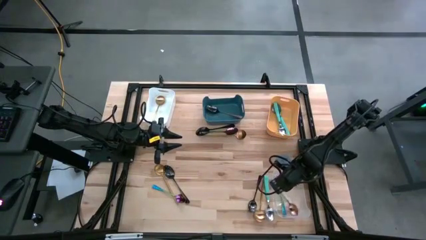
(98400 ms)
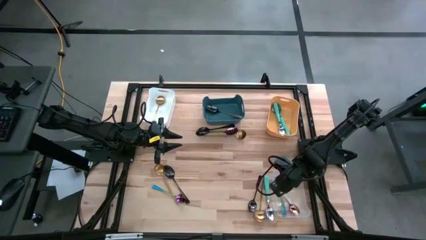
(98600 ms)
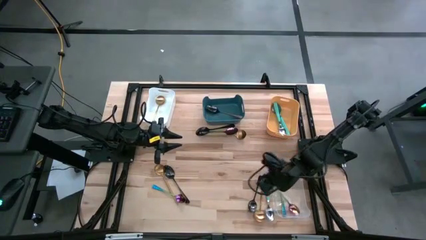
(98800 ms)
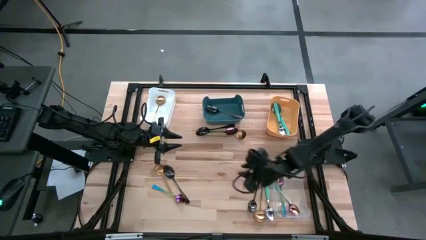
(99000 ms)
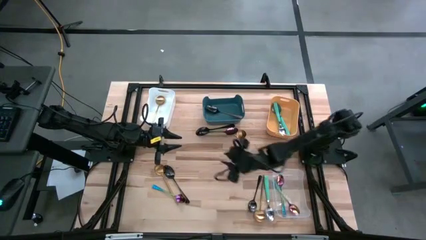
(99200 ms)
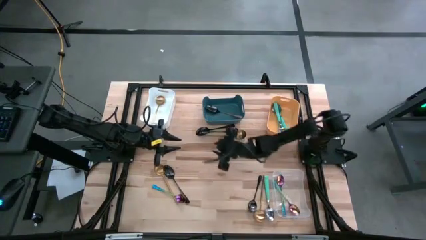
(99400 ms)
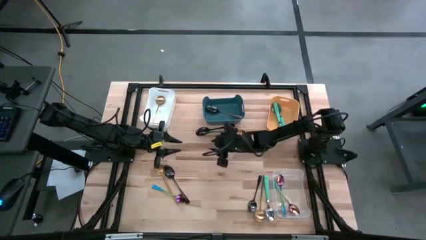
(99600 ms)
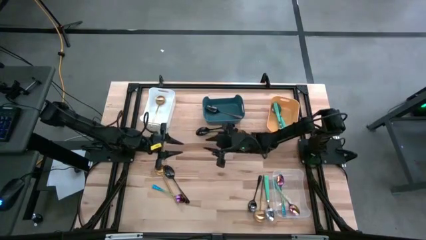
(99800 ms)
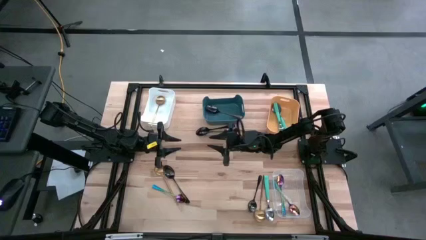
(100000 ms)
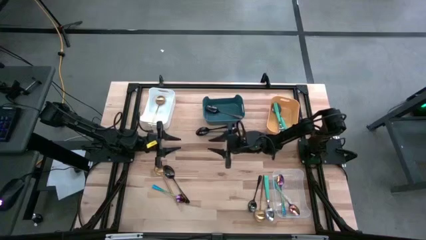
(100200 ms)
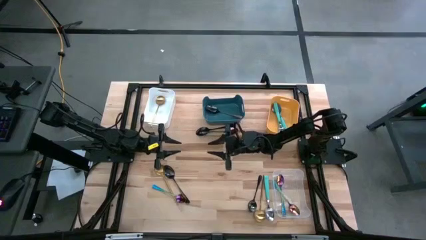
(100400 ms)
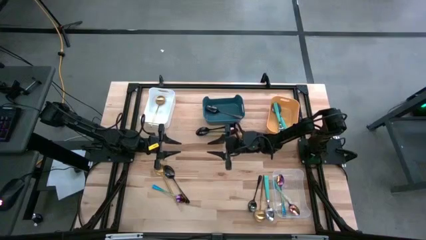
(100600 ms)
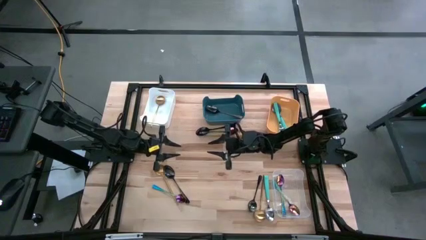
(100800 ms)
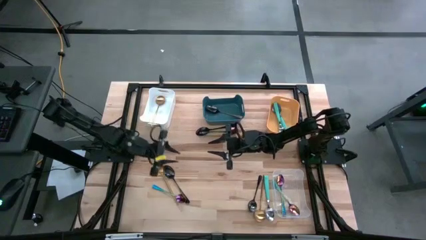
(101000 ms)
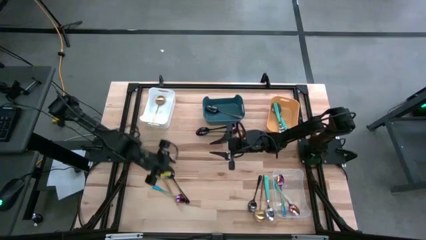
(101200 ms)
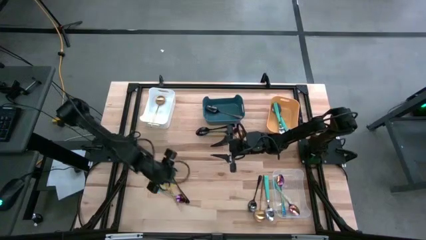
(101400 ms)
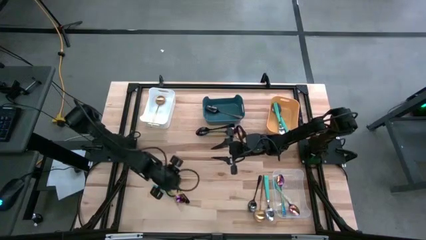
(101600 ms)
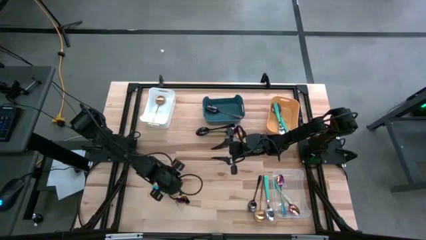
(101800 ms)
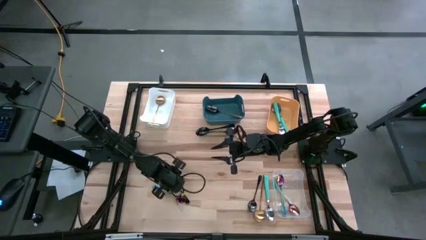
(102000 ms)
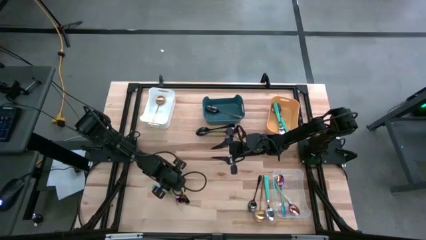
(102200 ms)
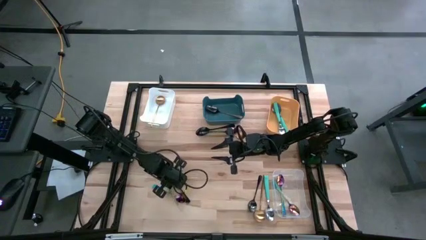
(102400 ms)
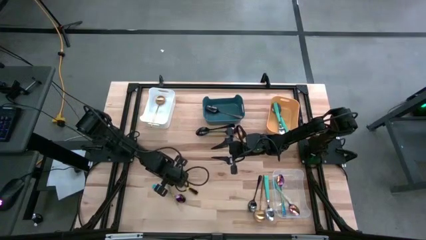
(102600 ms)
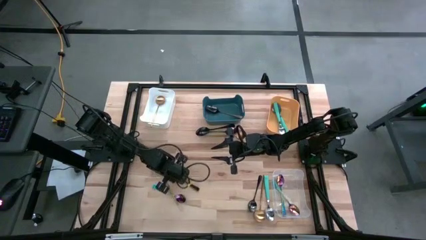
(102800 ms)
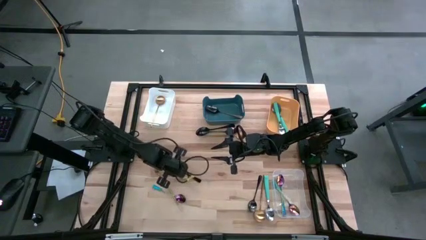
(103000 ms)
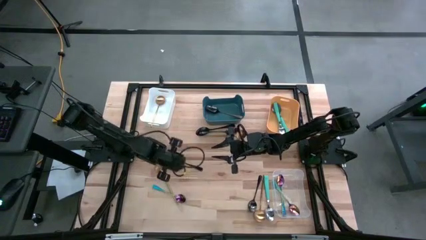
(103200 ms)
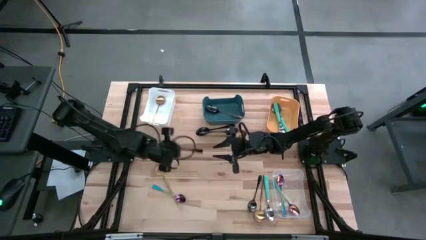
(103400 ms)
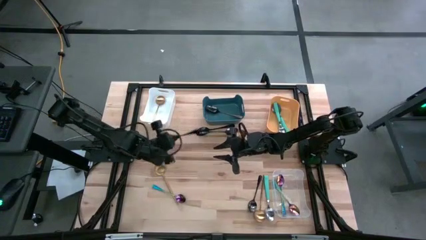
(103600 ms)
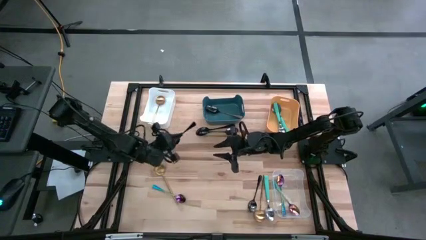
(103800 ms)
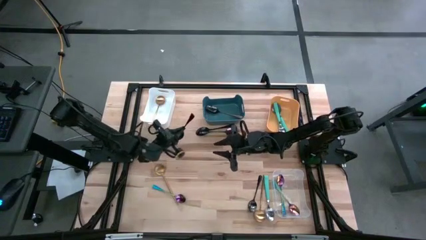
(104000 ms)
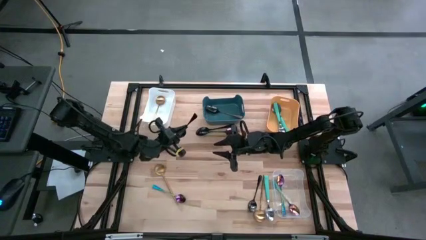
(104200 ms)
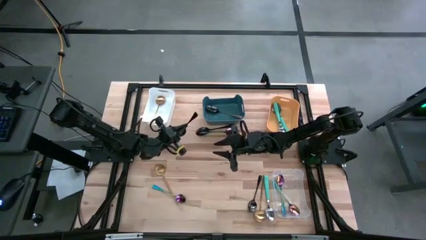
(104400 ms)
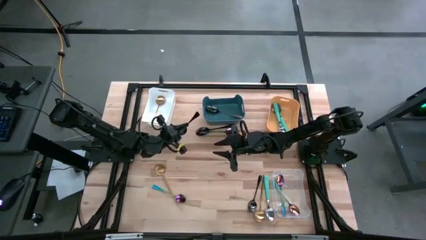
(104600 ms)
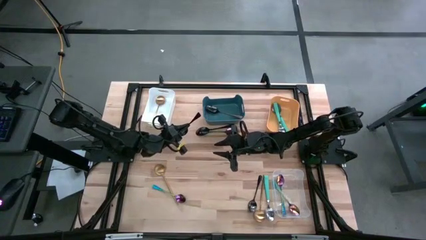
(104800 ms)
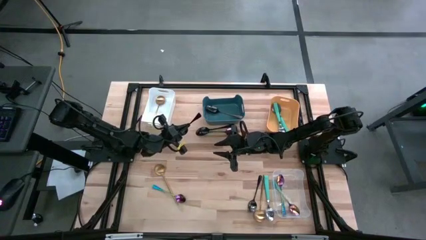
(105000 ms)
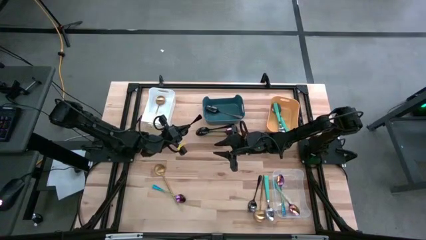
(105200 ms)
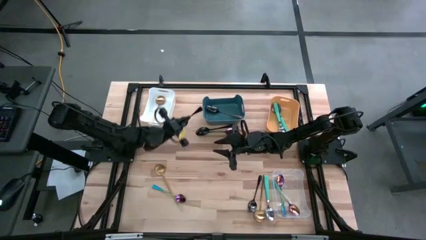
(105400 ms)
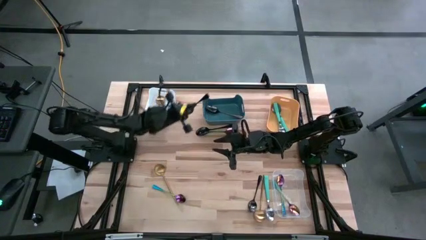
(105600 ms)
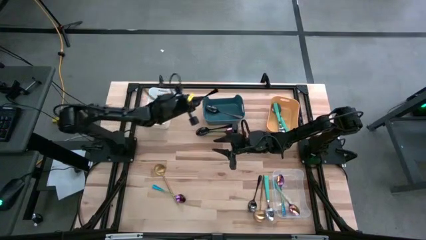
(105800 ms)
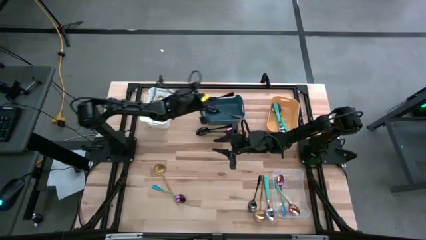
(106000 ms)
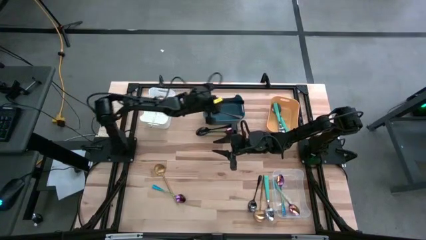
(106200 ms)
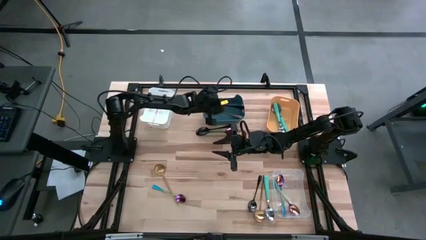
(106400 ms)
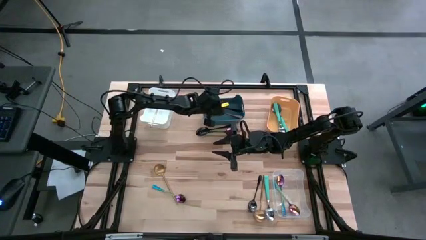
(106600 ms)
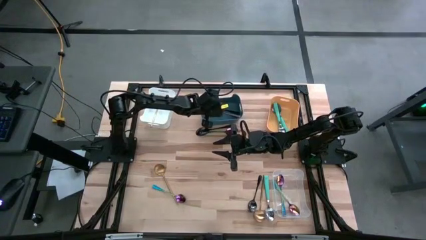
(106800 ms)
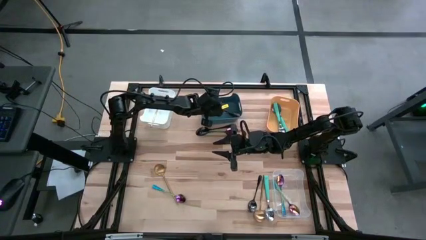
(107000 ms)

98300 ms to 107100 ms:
Task: Sort silverware by color (type)
Put the black spoon into the blue bin

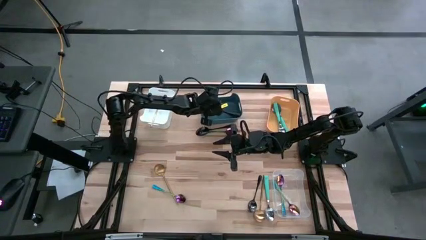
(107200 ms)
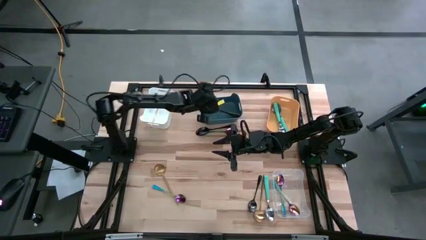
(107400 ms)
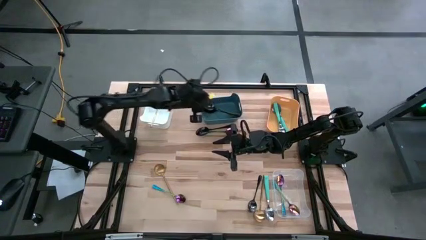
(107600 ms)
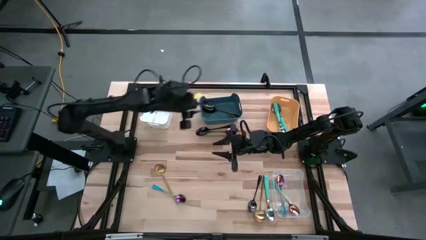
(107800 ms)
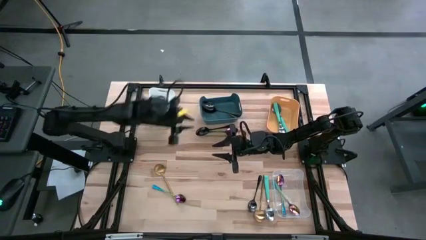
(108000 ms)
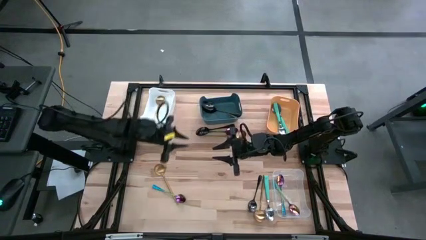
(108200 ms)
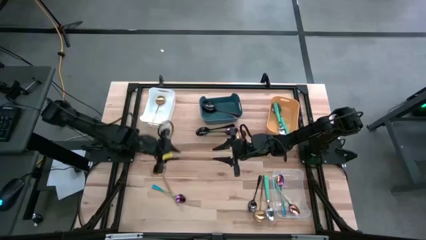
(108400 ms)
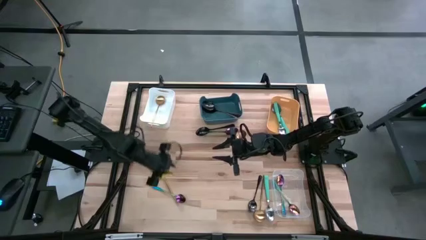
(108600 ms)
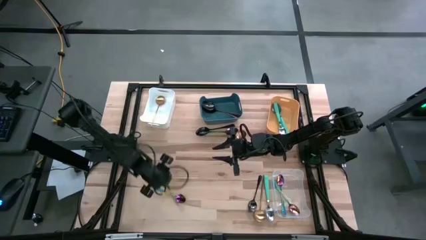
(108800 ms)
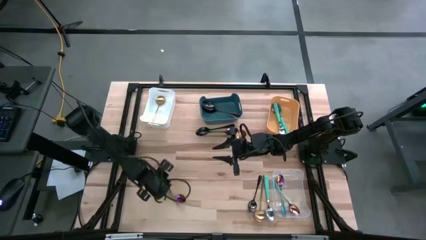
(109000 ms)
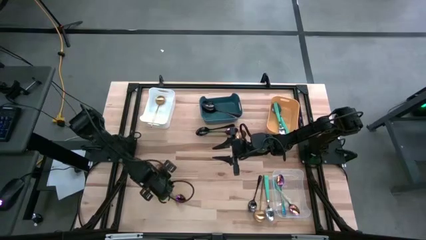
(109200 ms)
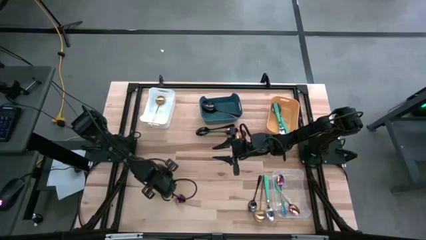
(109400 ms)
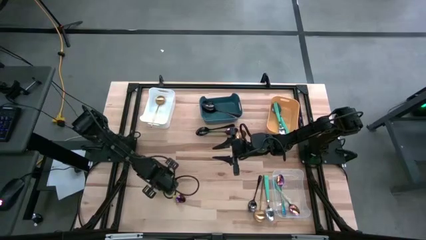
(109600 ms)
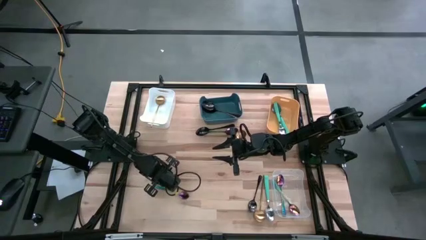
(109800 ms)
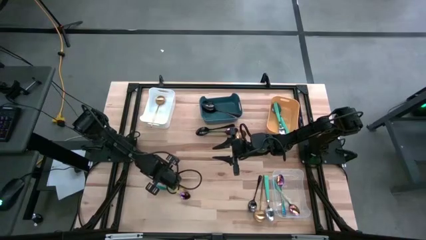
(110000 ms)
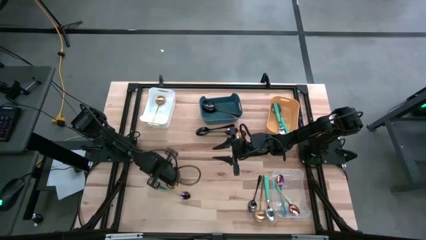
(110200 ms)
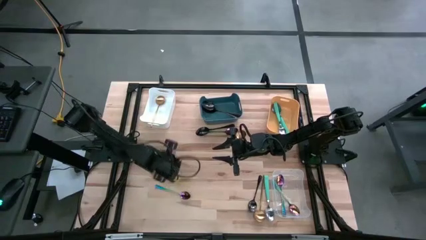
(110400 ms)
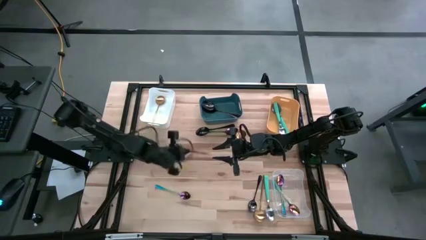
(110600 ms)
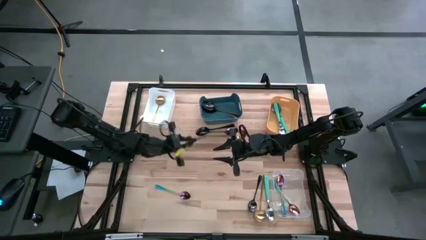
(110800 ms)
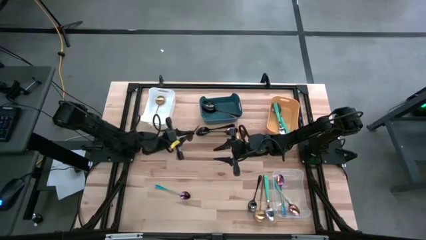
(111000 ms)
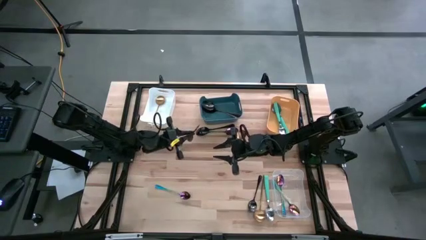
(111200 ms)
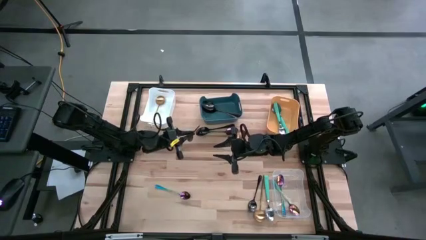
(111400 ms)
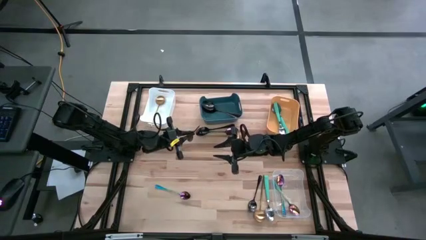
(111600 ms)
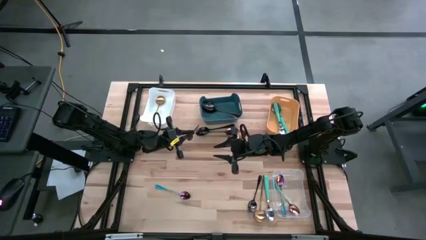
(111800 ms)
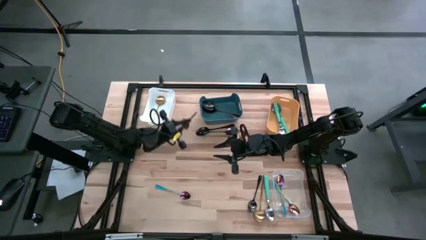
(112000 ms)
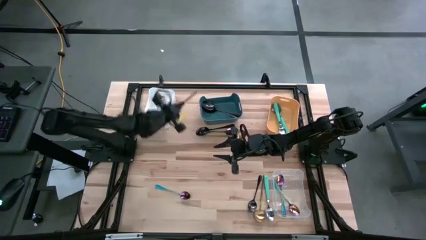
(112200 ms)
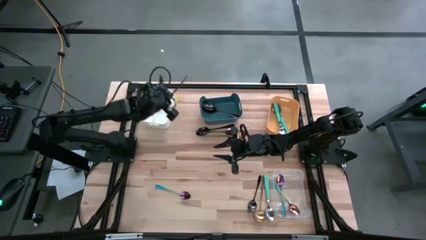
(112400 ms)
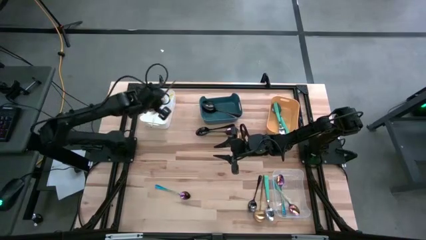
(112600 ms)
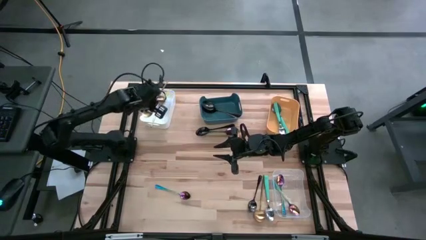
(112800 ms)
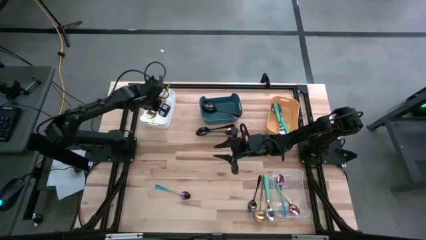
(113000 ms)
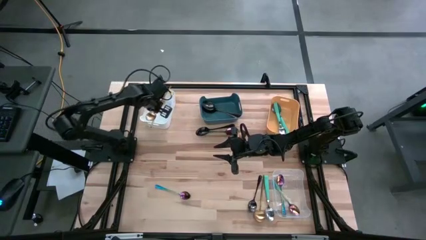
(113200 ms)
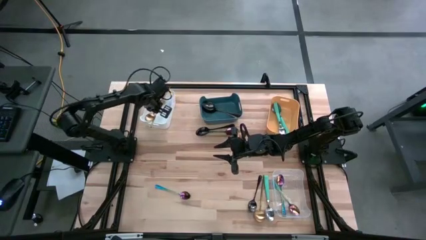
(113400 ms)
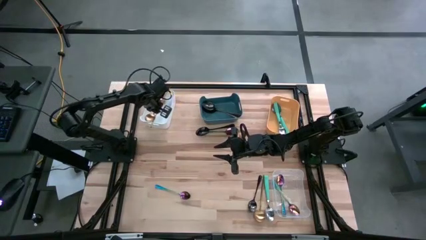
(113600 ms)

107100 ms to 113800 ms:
Put the gold spoon into the white bin
